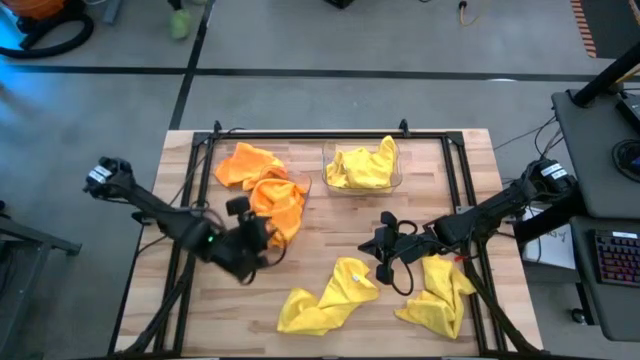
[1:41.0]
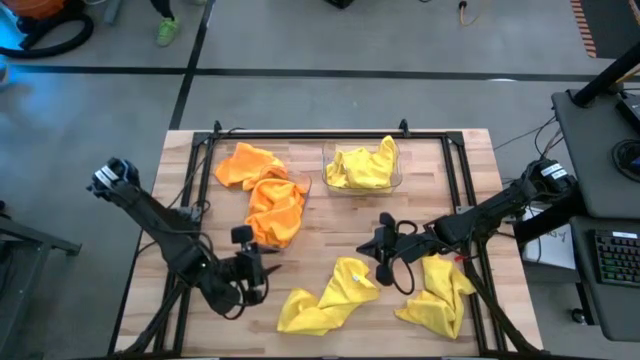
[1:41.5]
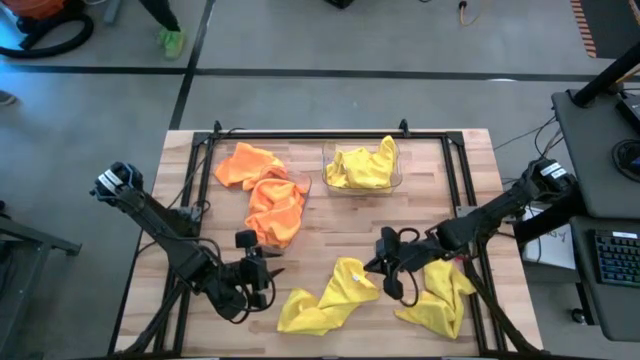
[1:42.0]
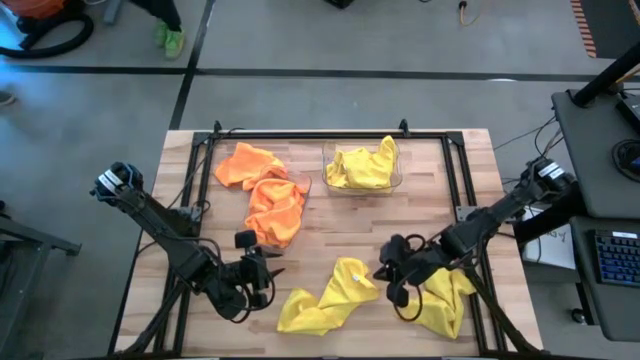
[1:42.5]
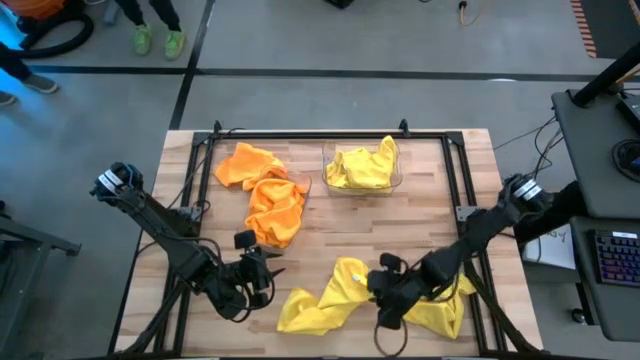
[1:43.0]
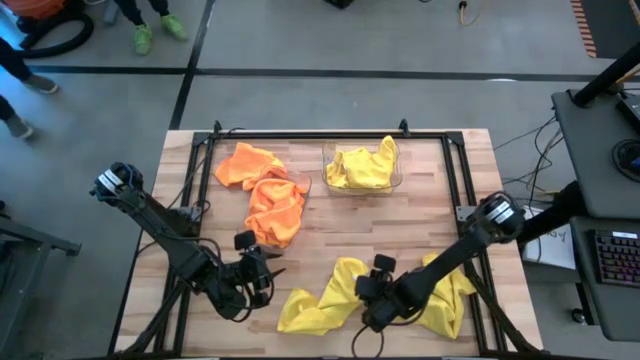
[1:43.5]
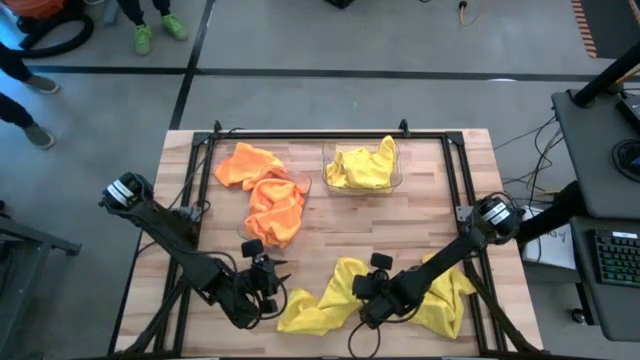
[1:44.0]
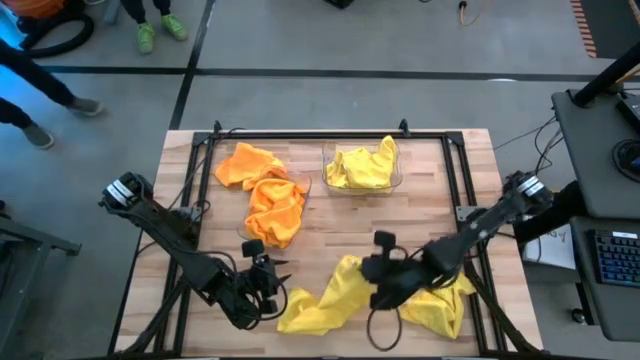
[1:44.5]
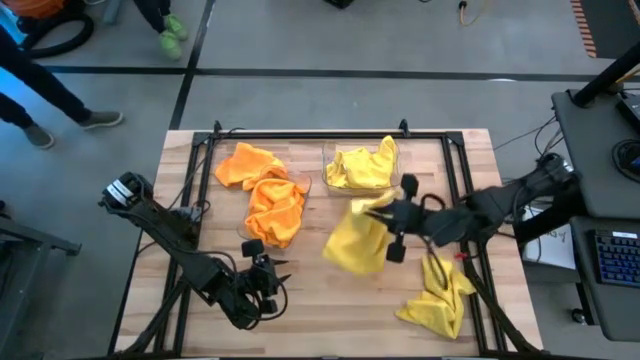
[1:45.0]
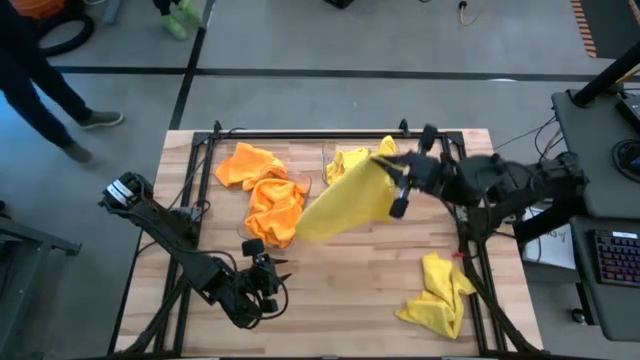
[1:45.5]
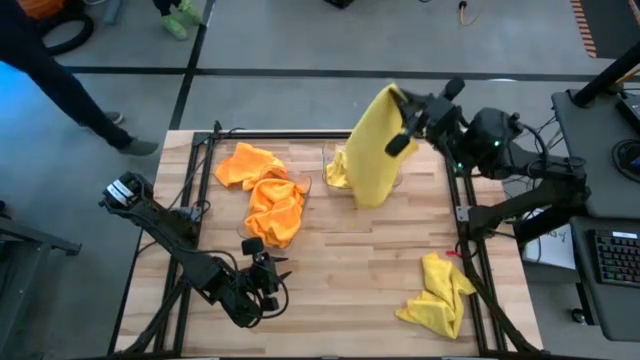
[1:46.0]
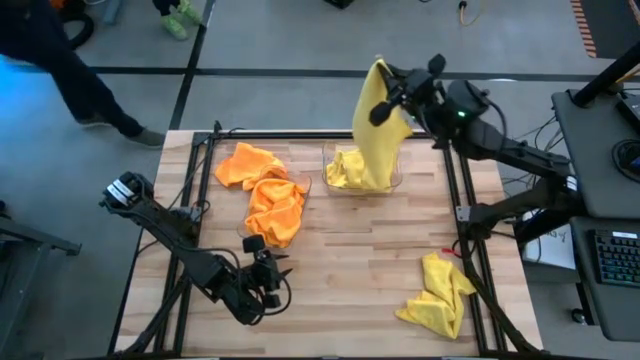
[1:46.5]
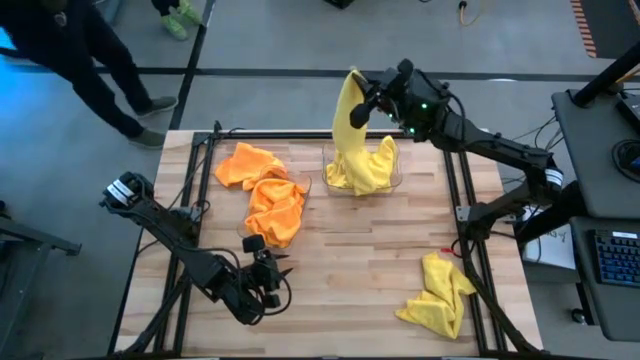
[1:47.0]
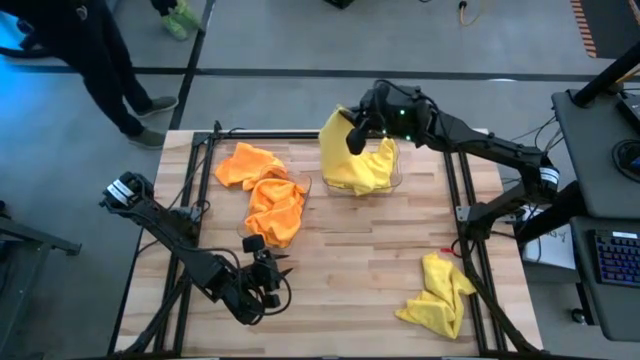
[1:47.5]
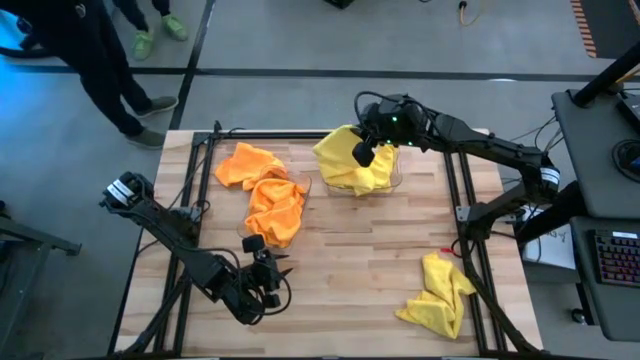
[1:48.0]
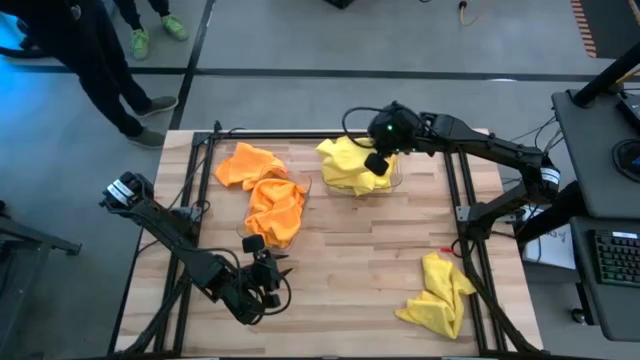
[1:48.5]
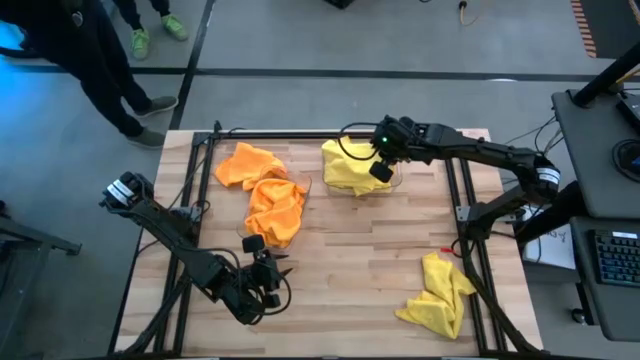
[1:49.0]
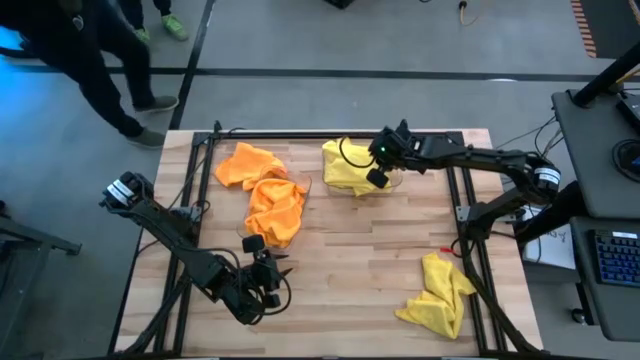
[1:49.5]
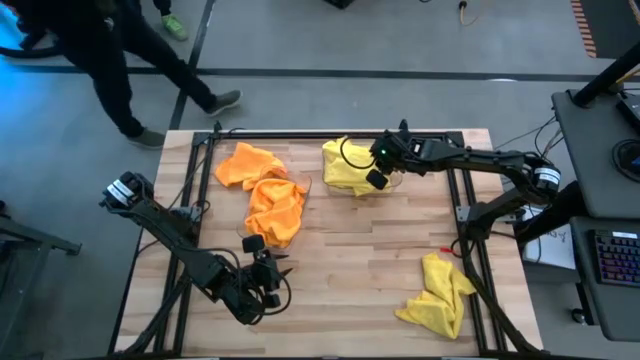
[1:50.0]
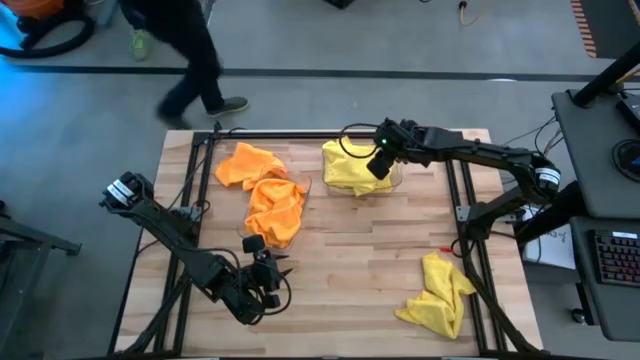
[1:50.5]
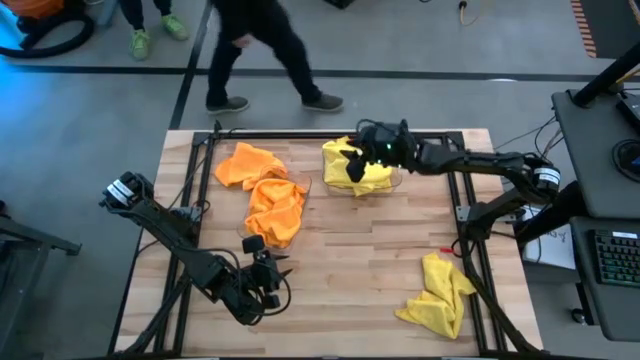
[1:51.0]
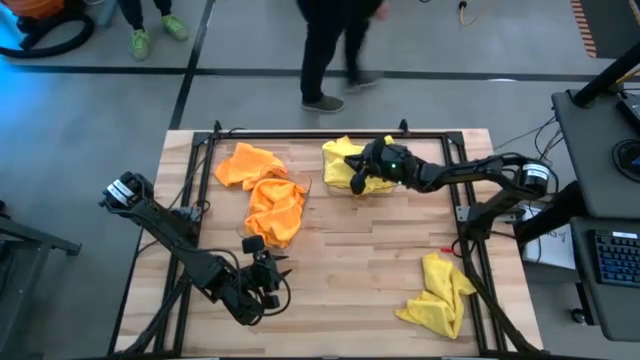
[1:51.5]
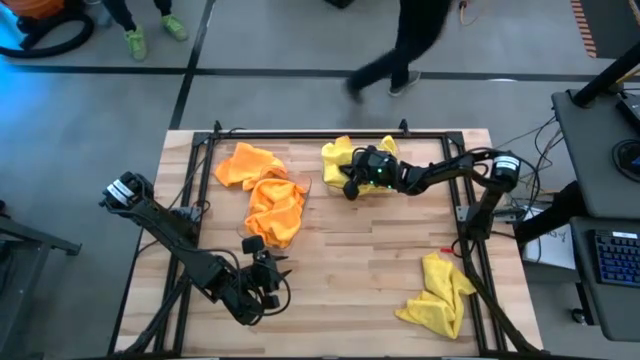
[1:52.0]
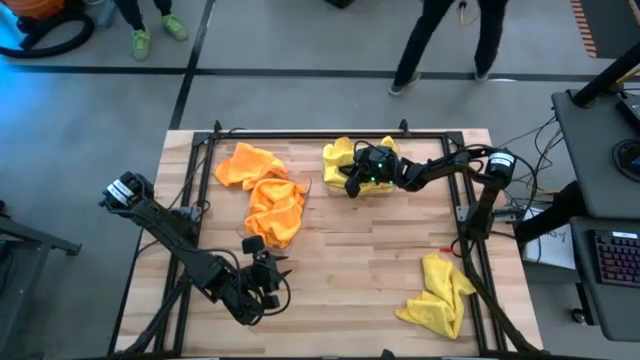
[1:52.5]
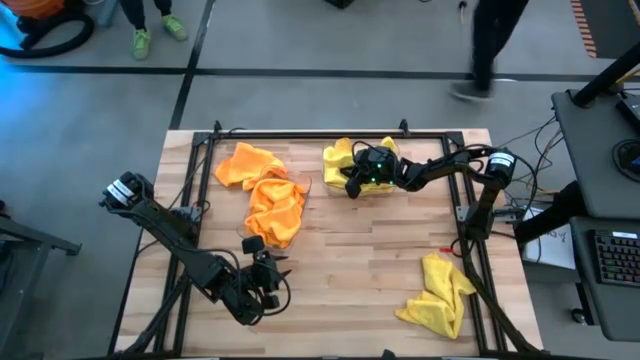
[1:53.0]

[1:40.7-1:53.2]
Task: Sort microfiber towel by color & place in baskets
Put the yellow microfiber towel into the right transparent bin

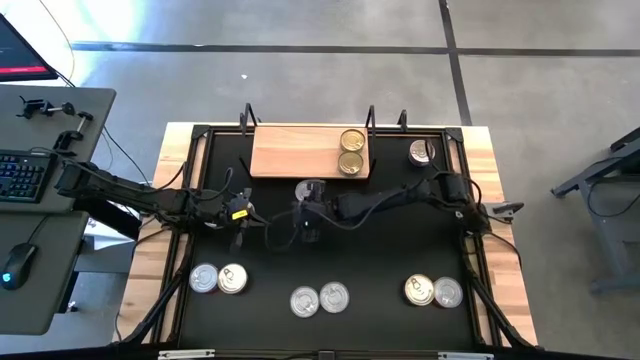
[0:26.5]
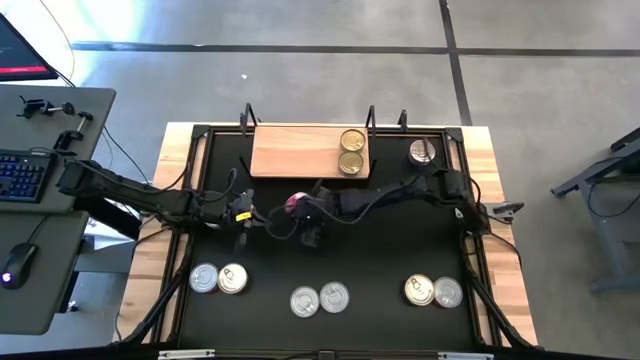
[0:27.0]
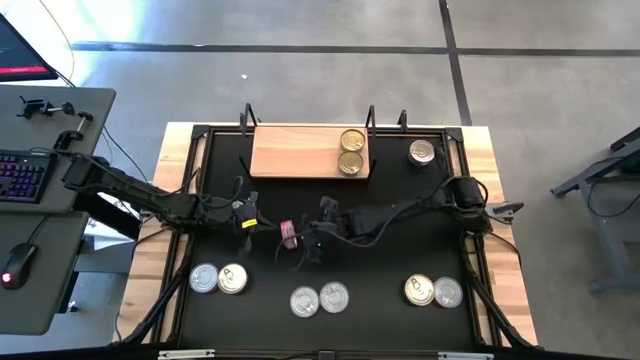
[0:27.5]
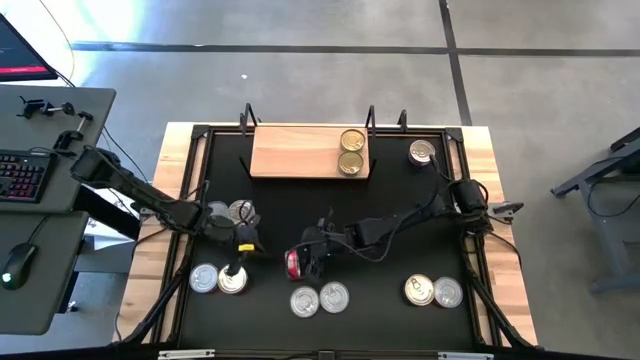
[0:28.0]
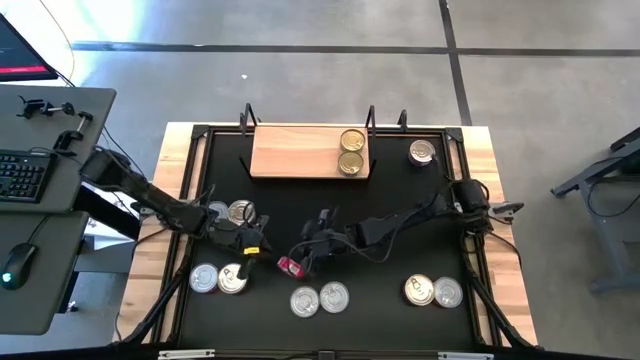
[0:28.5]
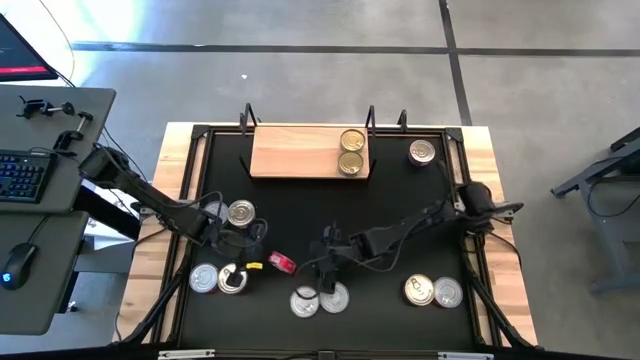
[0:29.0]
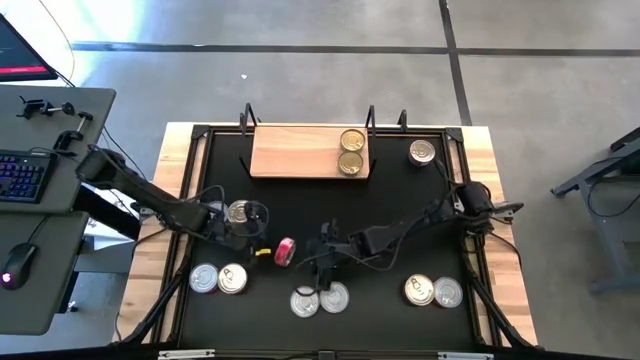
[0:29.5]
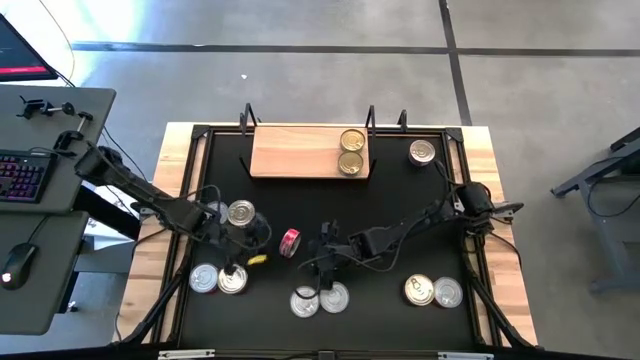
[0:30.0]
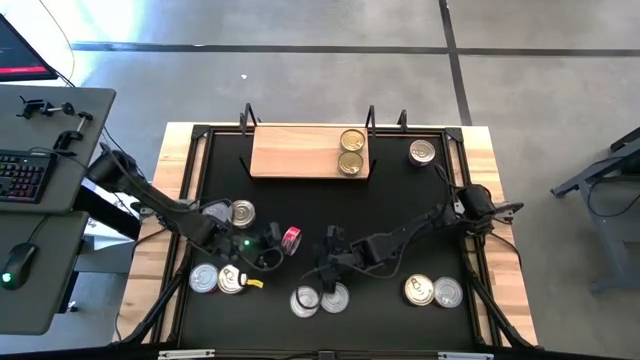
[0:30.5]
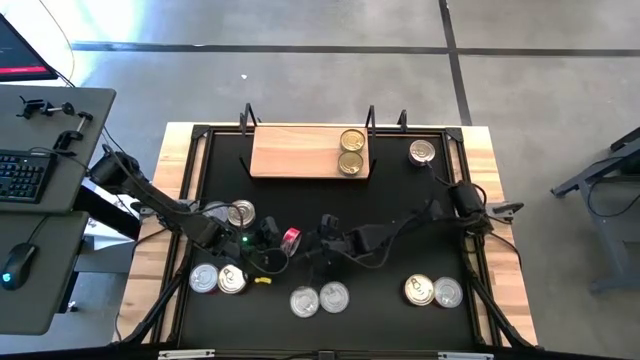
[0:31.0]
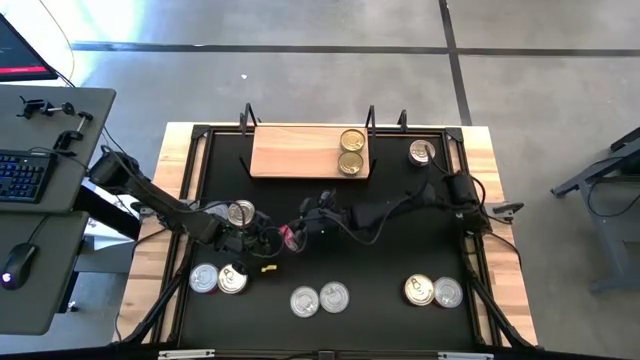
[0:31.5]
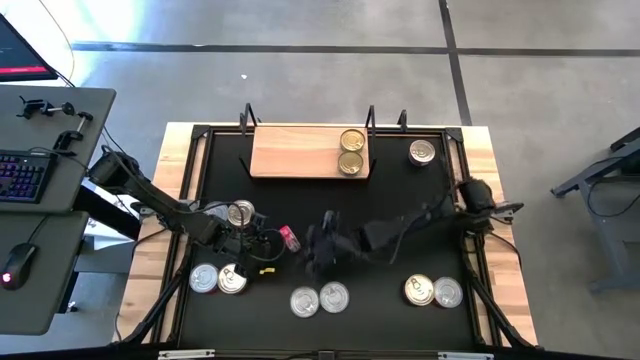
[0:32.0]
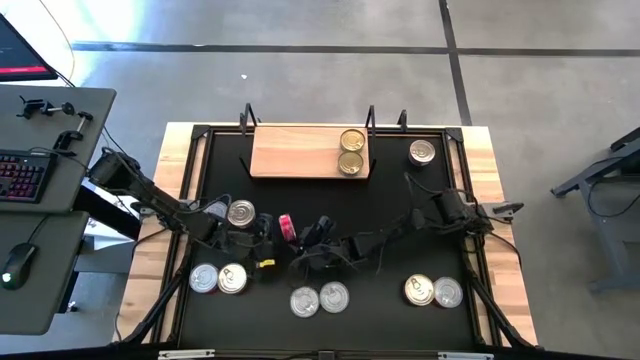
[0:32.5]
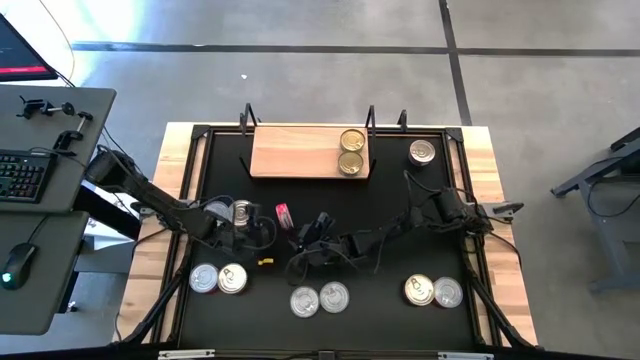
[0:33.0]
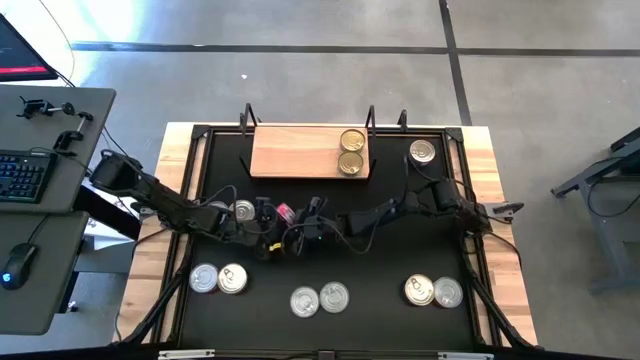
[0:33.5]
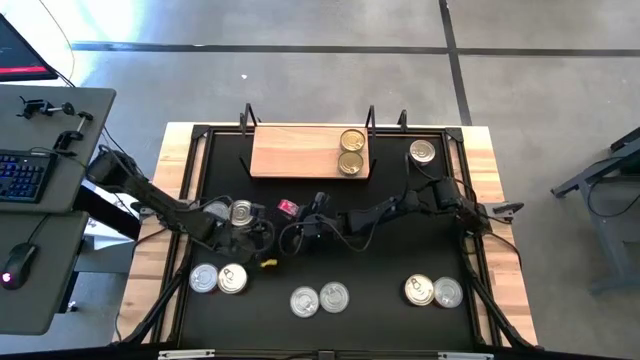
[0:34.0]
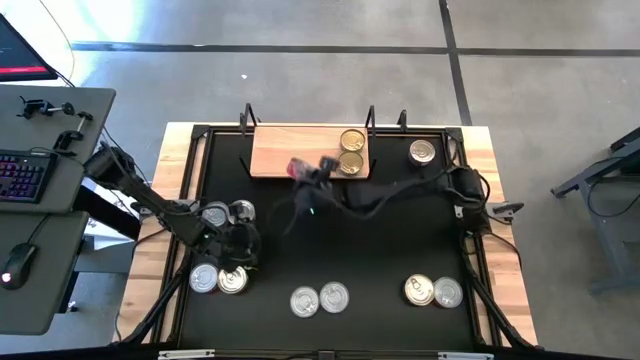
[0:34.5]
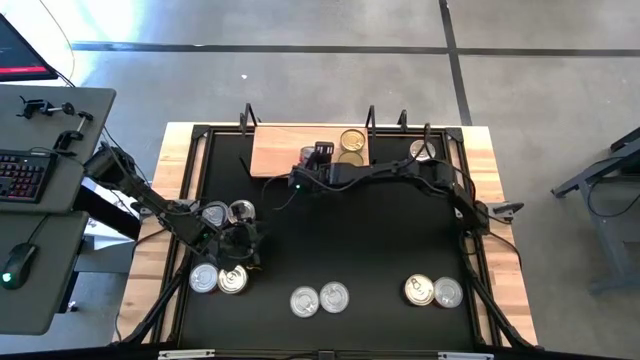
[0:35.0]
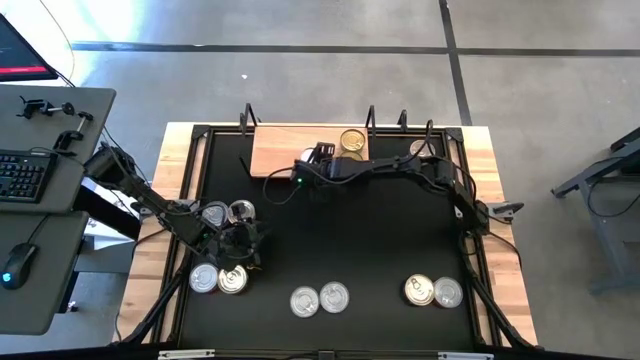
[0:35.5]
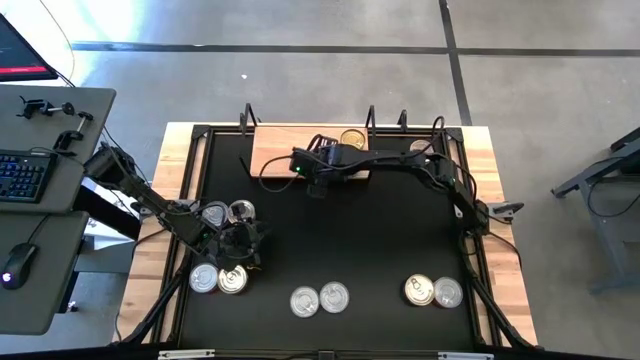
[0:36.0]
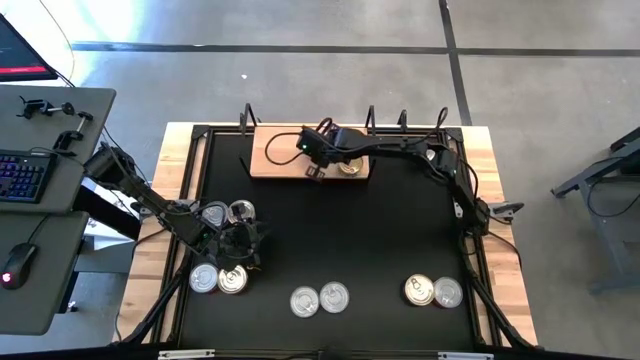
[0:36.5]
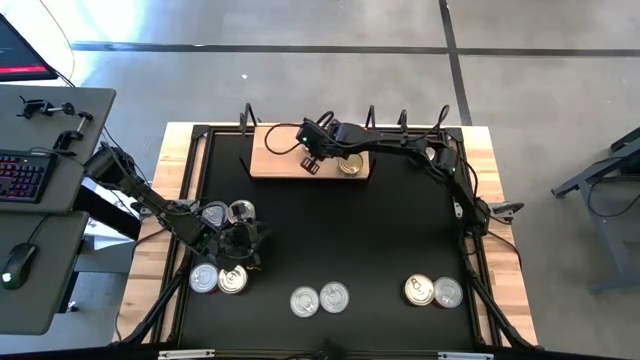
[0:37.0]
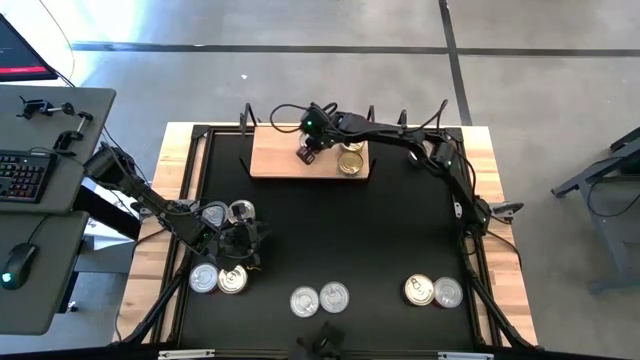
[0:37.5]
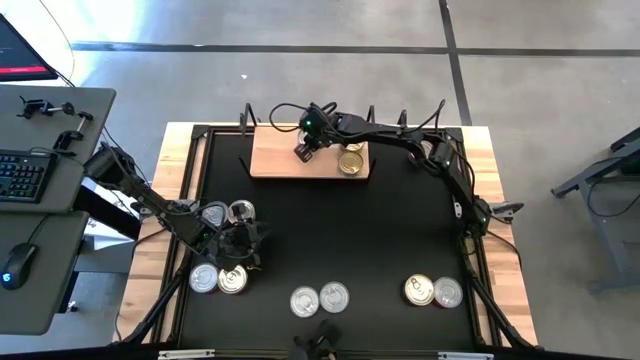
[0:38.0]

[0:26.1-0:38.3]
Task: Stack canned seafood by type on shelf
Put the red tuna can on the shelf
